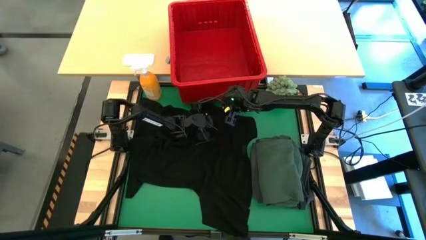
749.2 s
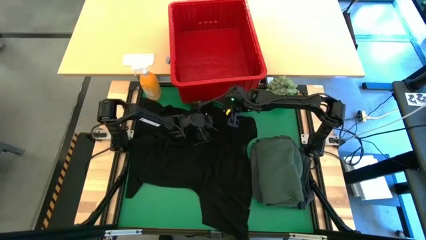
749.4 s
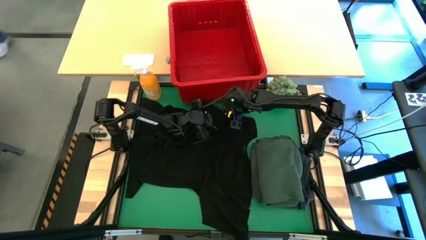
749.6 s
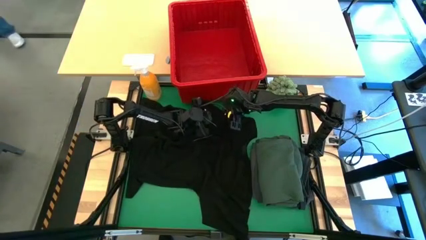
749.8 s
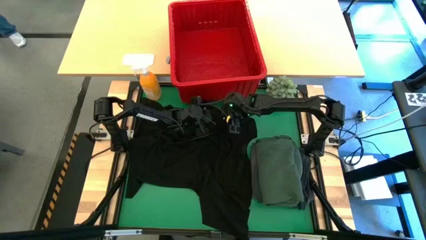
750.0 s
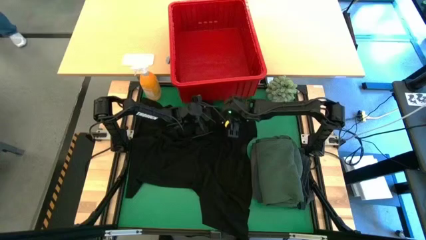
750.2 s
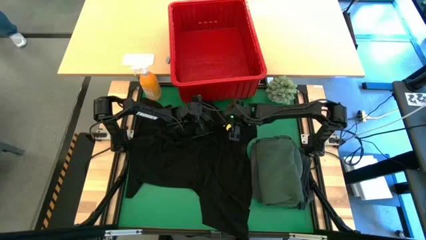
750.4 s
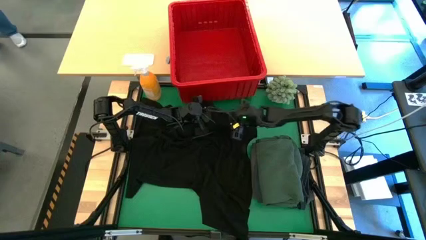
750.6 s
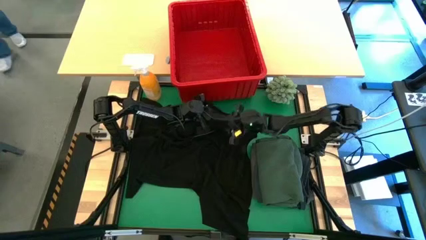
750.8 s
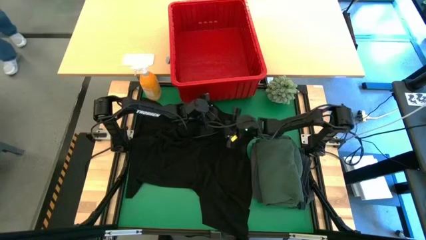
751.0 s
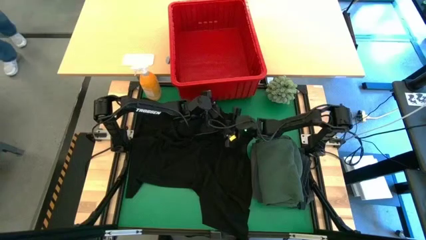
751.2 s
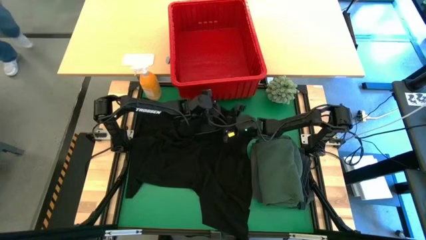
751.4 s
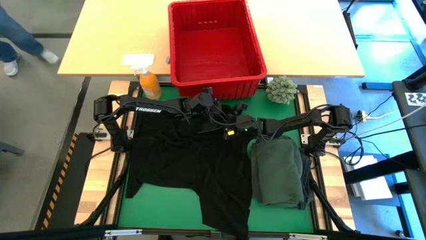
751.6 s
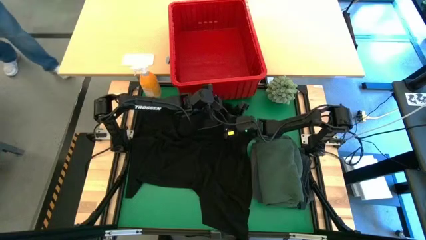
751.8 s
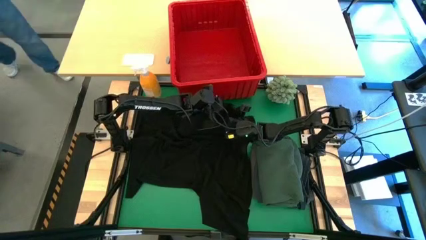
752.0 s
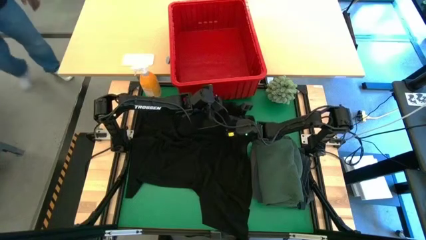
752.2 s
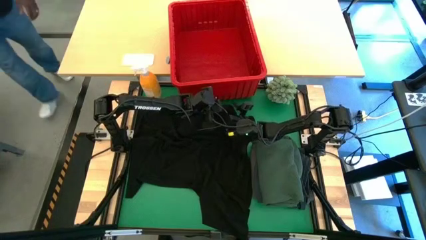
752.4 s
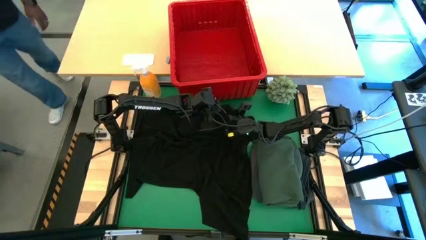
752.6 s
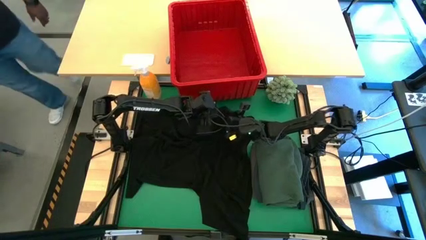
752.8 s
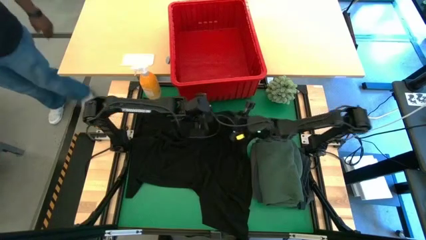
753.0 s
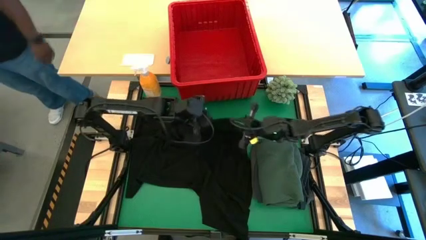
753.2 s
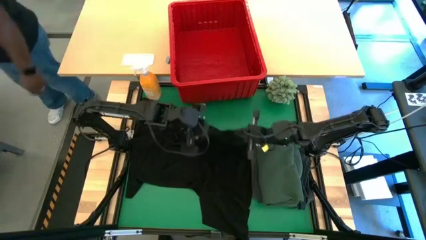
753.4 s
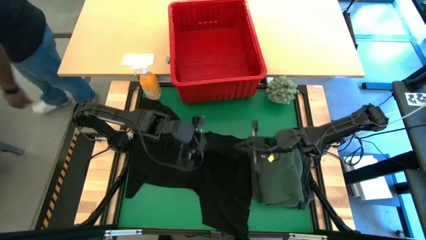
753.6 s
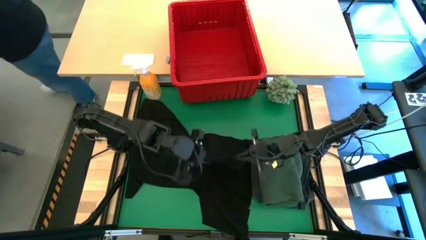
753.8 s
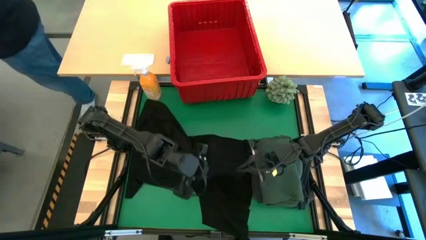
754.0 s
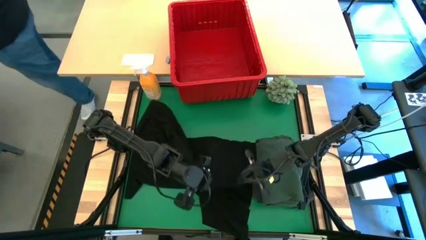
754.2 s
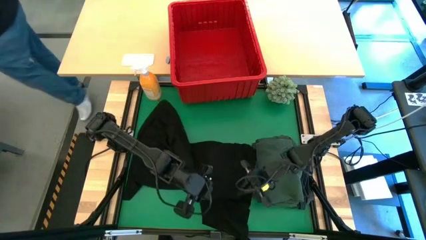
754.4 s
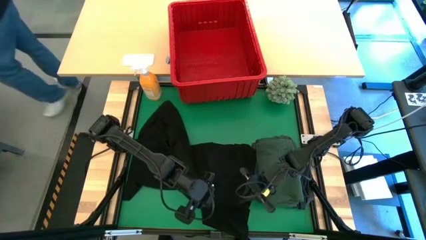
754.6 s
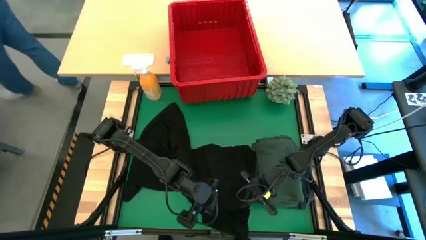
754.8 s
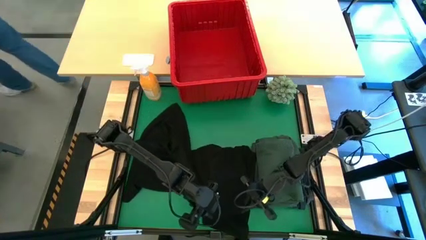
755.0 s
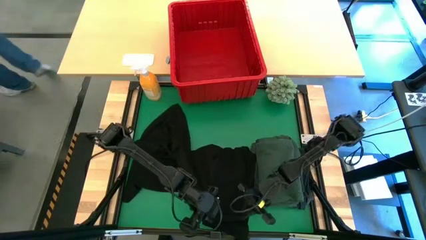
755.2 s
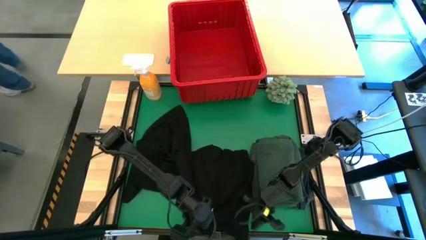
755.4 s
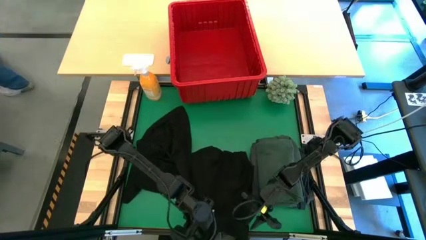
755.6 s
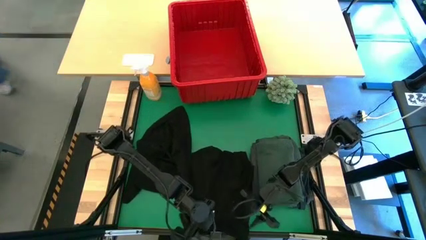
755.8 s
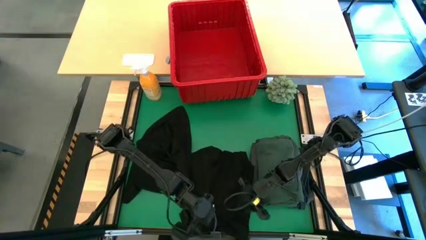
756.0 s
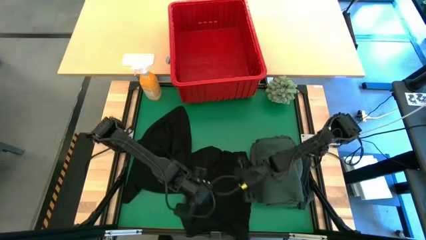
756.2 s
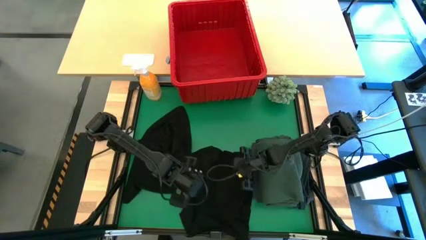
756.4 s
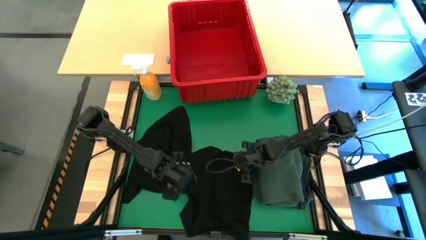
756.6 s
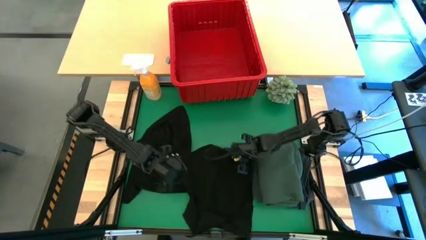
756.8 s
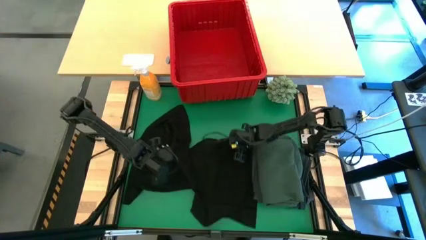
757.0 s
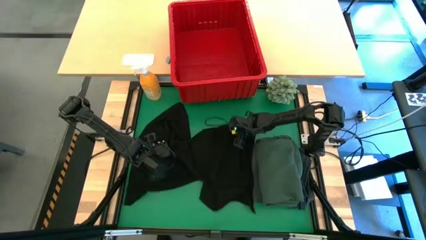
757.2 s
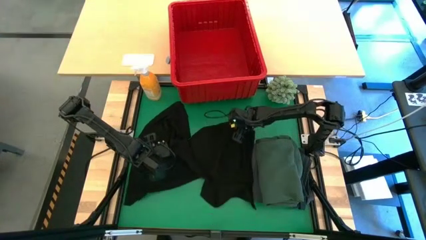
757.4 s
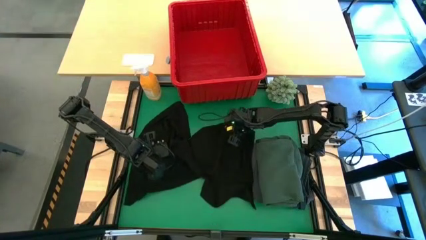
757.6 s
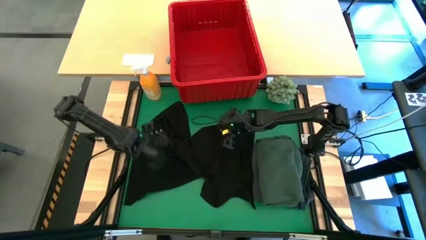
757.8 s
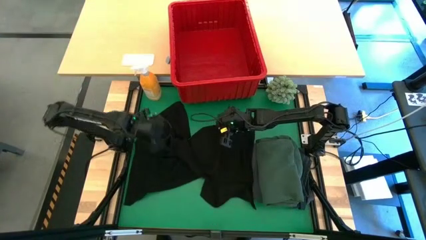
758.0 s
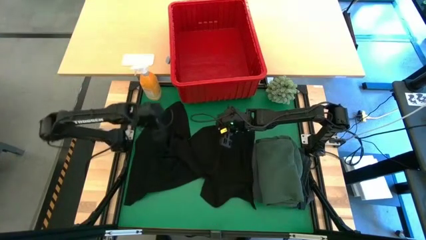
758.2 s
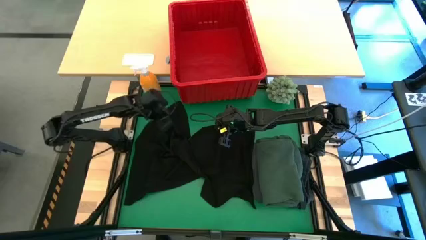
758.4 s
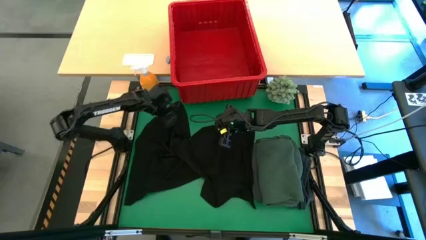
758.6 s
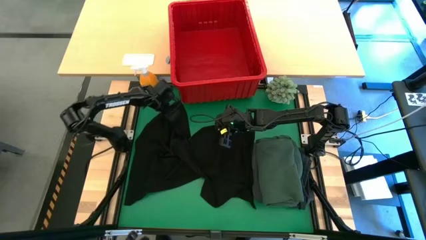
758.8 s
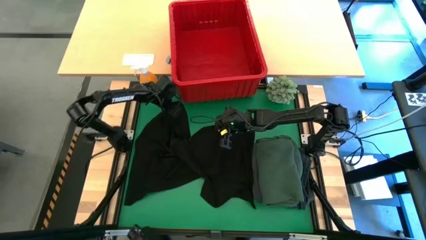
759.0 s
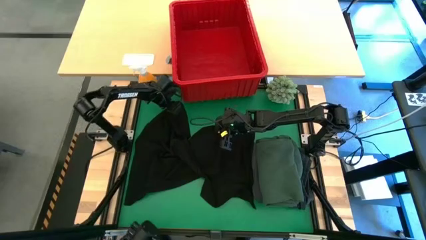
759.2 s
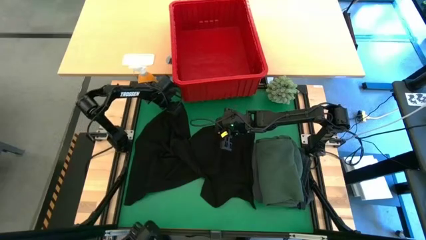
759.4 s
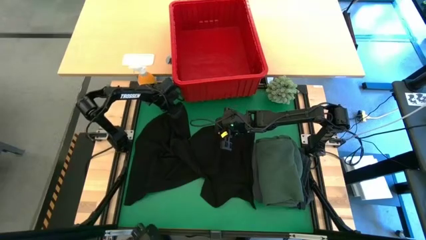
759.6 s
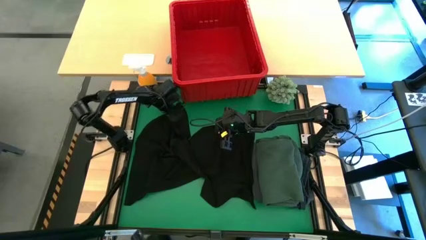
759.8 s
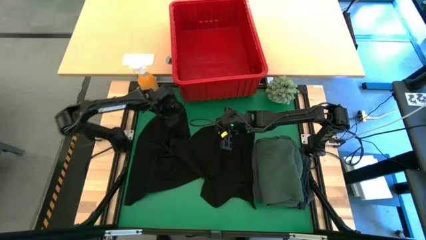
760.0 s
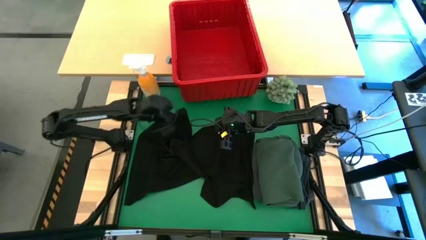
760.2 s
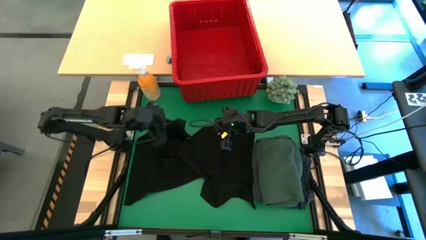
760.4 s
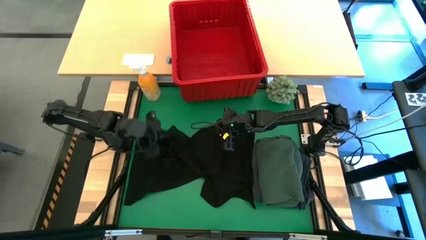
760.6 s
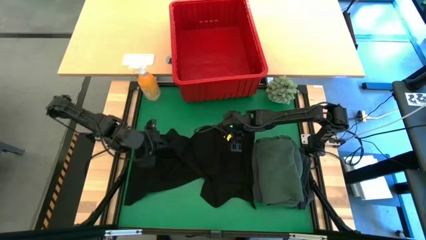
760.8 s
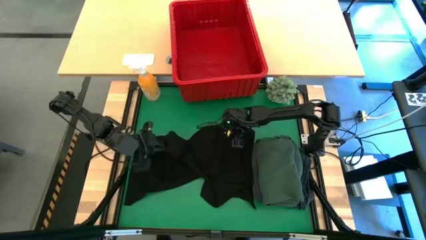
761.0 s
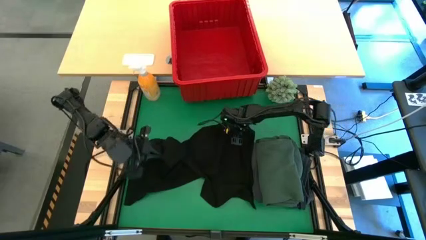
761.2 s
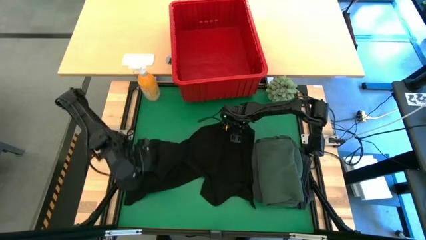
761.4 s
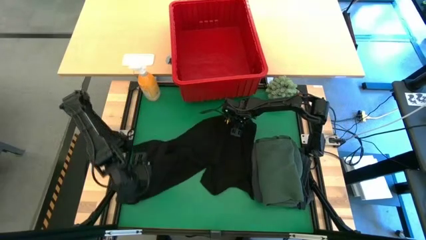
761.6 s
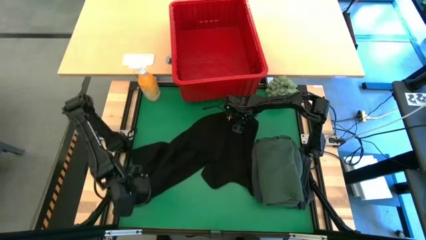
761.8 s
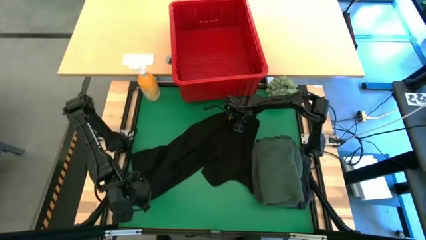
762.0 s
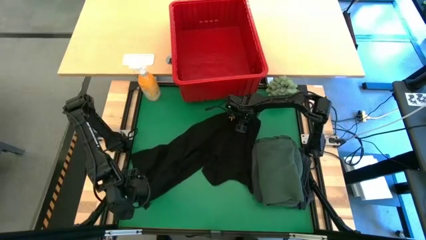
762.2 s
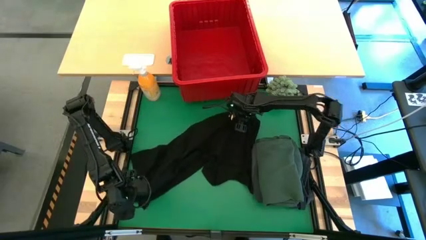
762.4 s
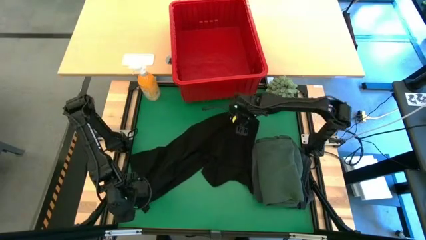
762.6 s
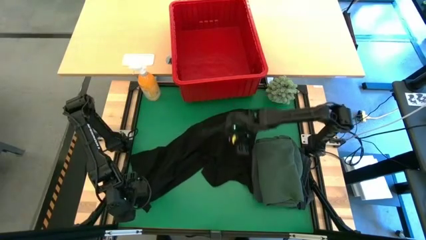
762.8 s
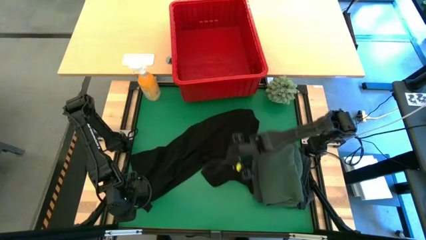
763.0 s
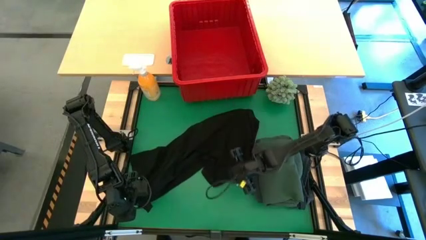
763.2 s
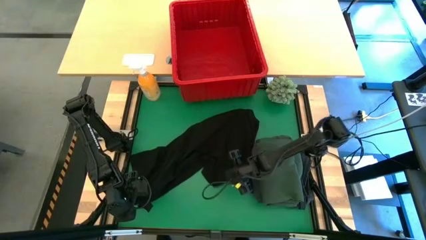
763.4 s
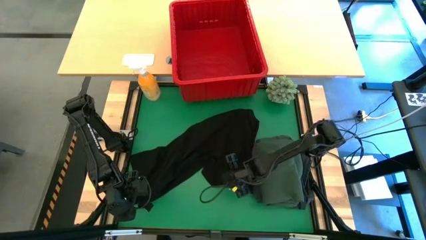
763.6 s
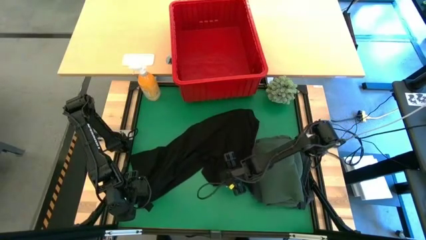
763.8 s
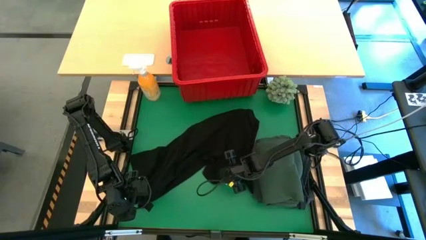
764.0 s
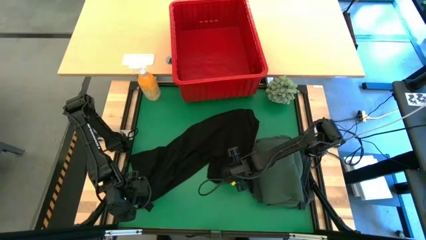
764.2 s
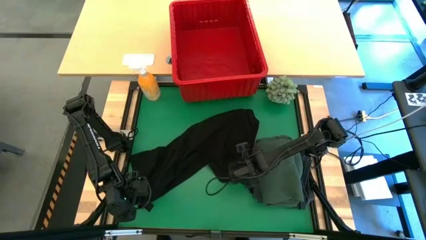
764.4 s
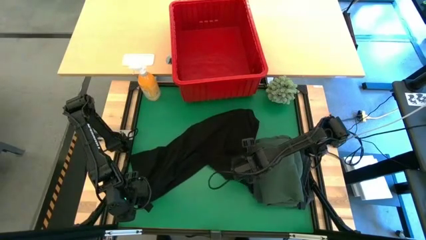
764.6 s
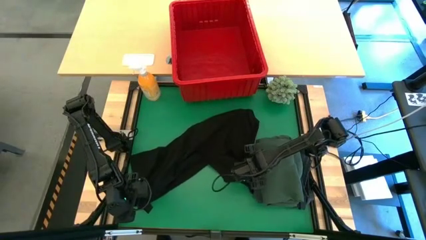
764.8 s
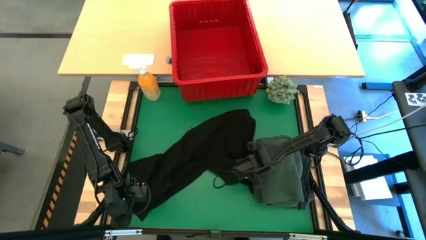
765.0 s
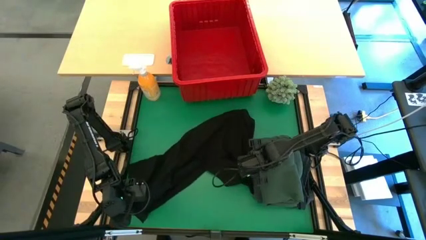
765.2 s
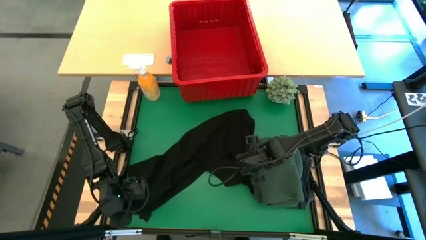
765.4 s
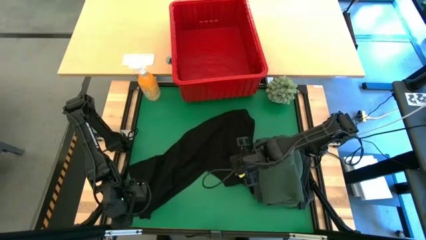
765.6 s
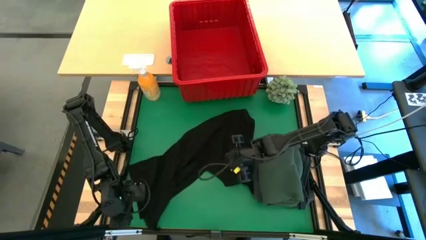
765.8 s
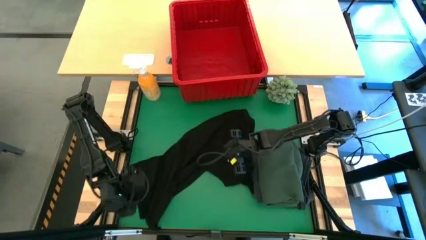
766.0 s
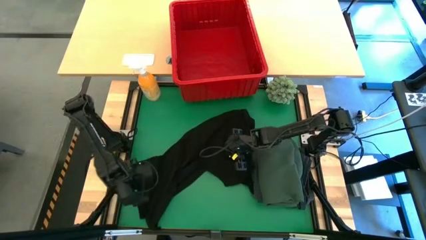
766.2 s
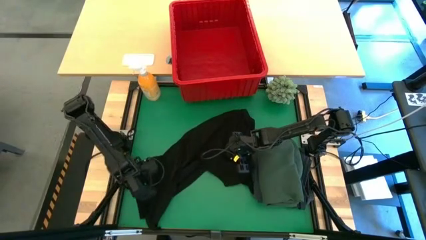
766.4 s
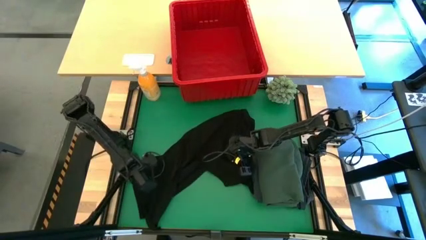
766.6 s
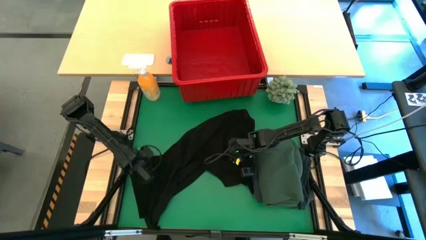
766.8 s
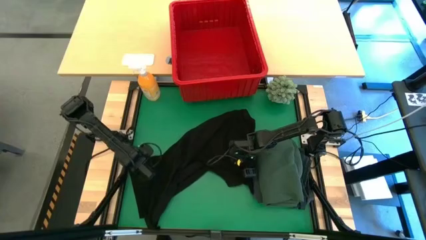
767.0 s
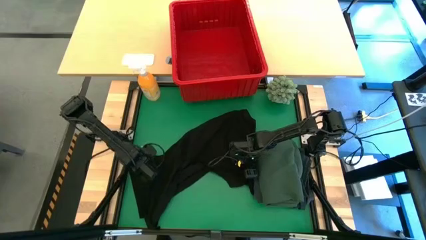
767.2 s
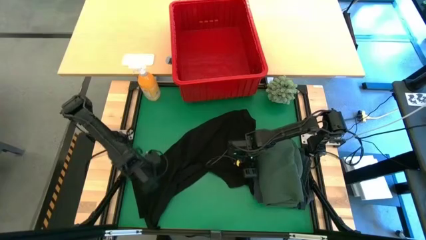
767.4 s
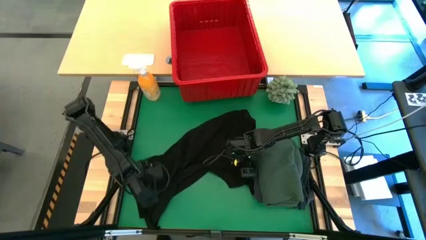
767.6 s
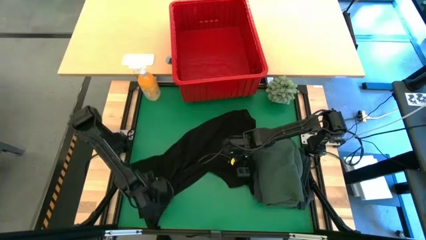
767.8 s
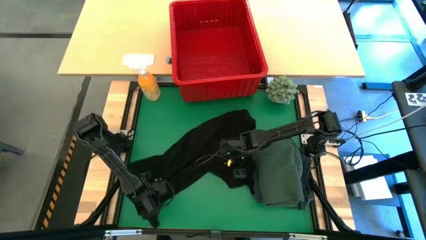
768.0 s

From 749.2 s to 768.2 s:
Task: Fold Laundry from Bin
Fold the black shirt
